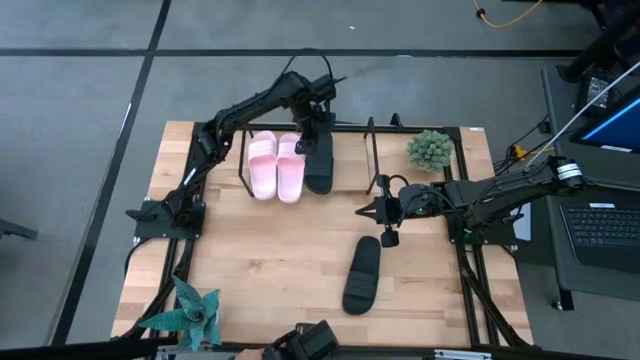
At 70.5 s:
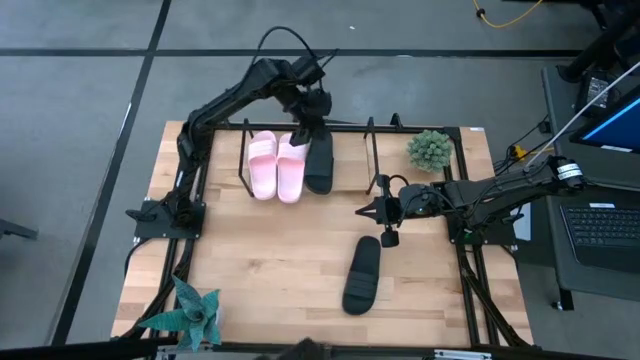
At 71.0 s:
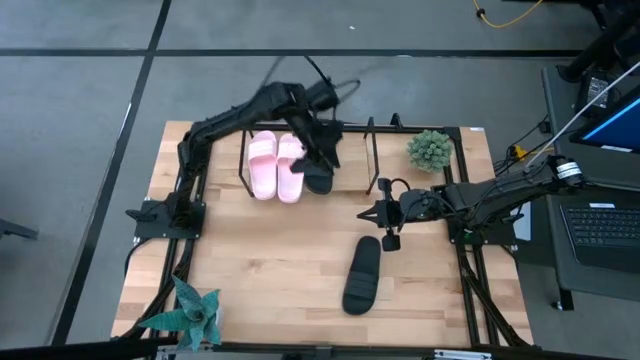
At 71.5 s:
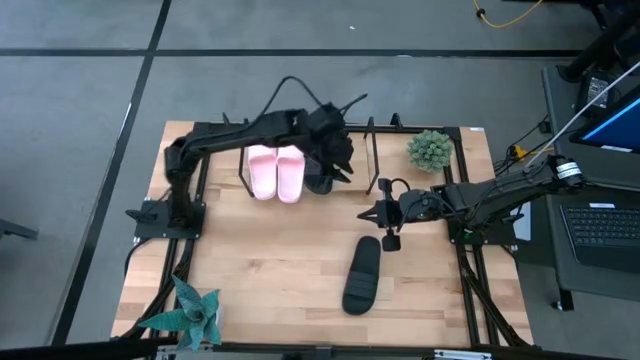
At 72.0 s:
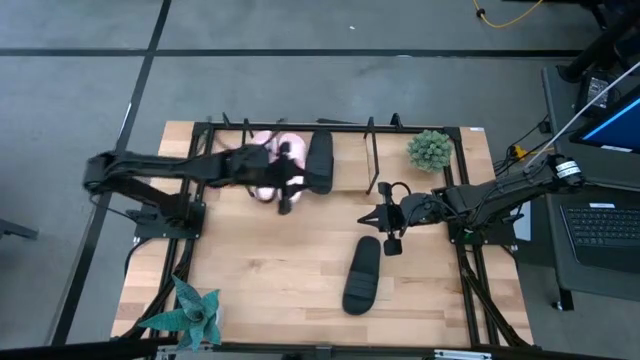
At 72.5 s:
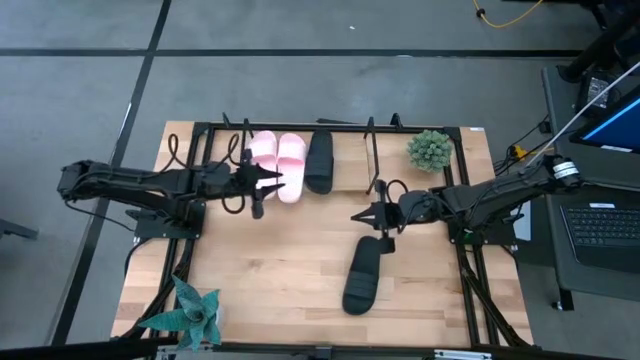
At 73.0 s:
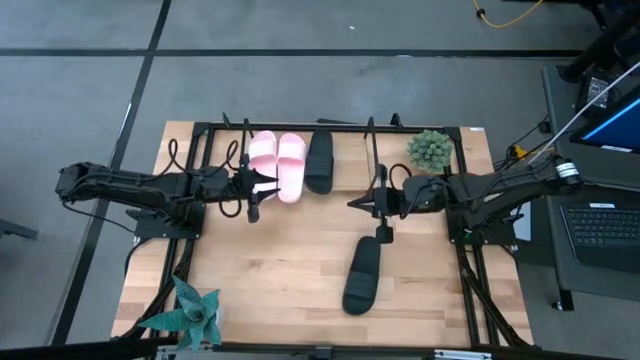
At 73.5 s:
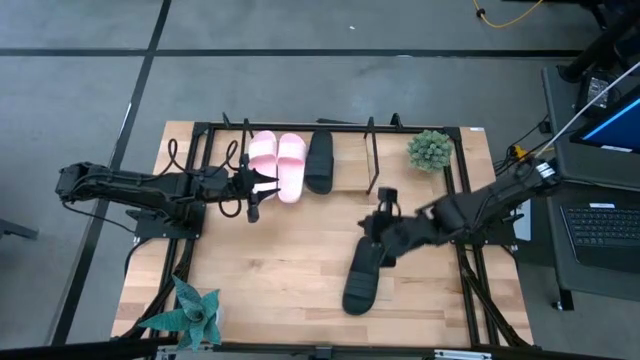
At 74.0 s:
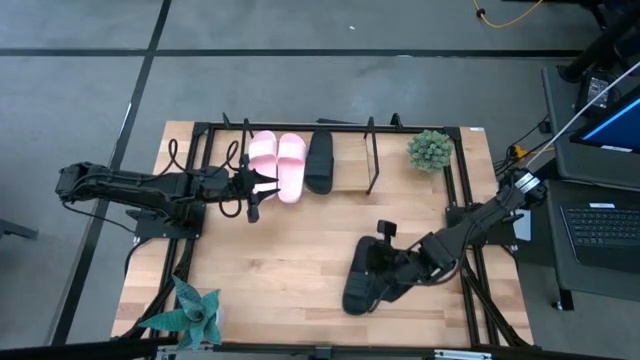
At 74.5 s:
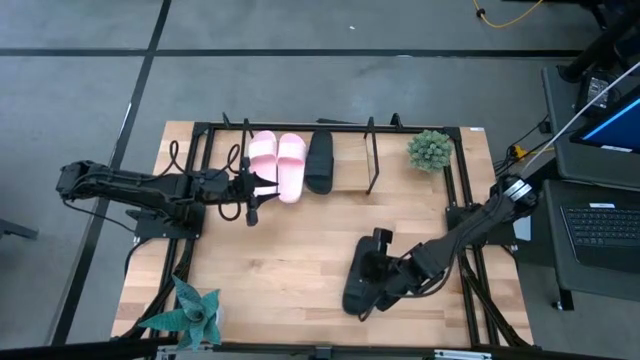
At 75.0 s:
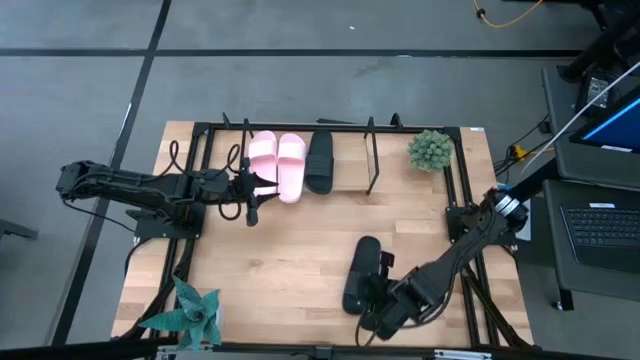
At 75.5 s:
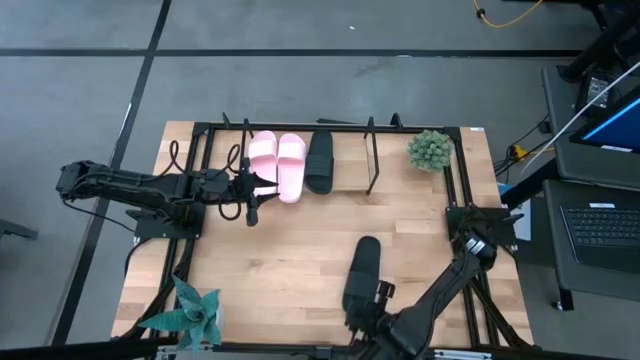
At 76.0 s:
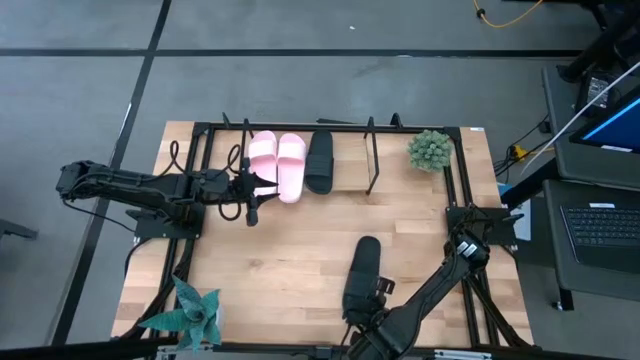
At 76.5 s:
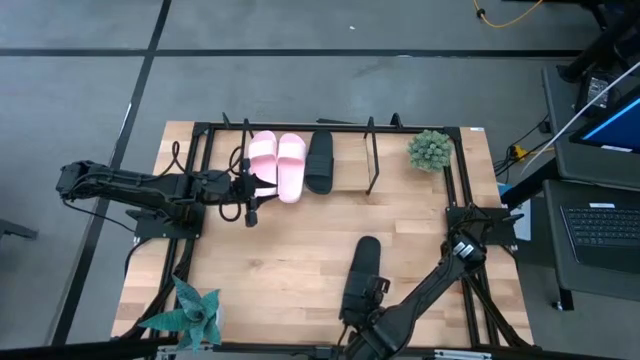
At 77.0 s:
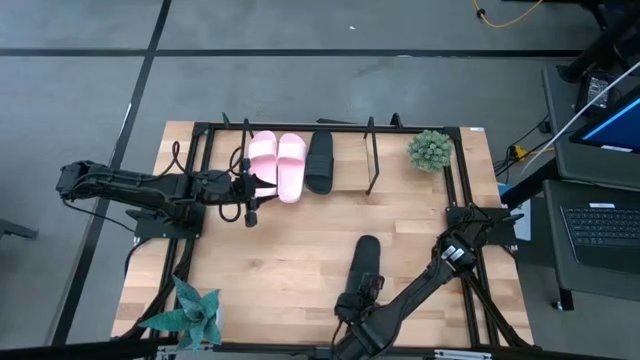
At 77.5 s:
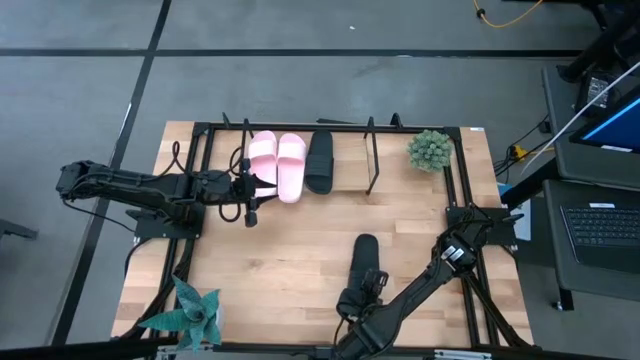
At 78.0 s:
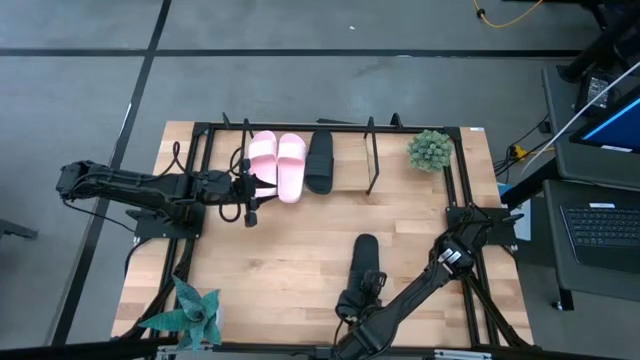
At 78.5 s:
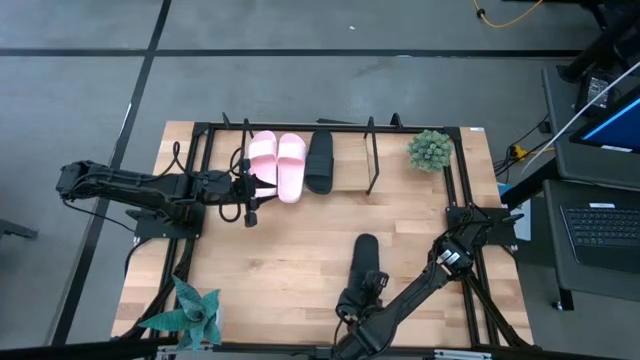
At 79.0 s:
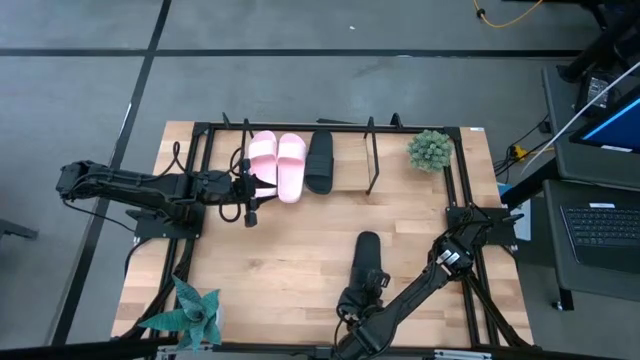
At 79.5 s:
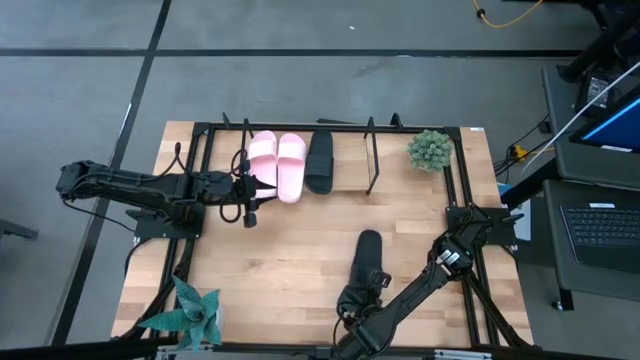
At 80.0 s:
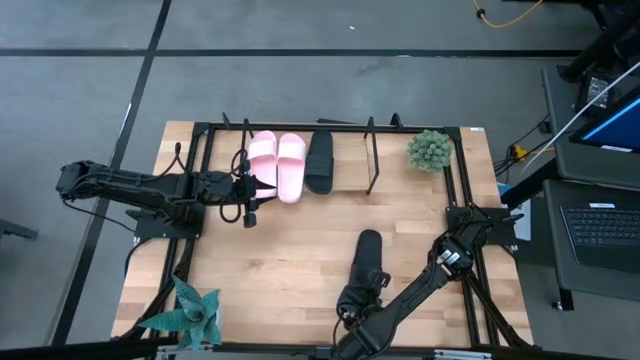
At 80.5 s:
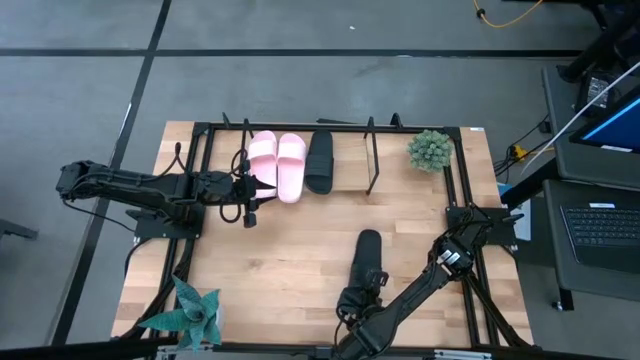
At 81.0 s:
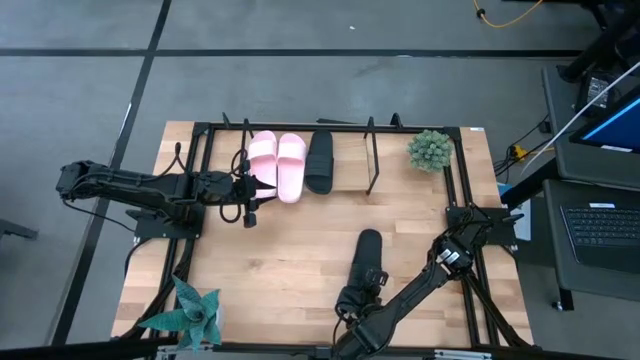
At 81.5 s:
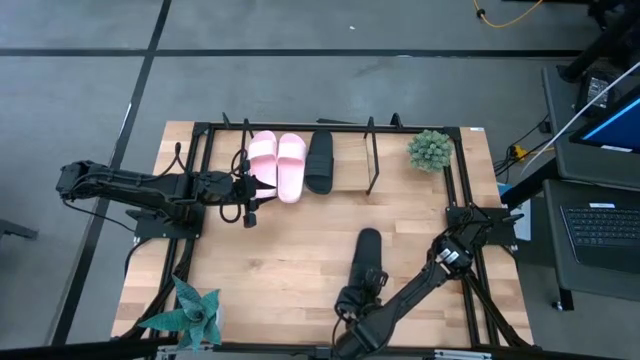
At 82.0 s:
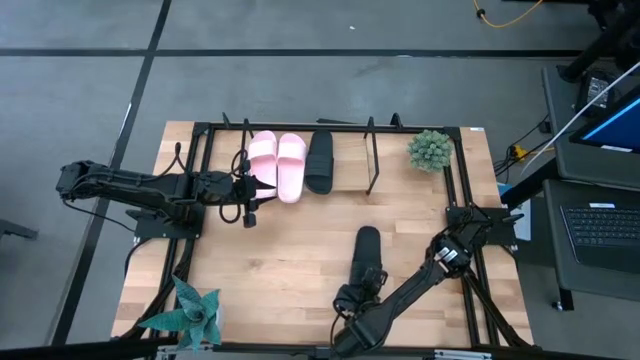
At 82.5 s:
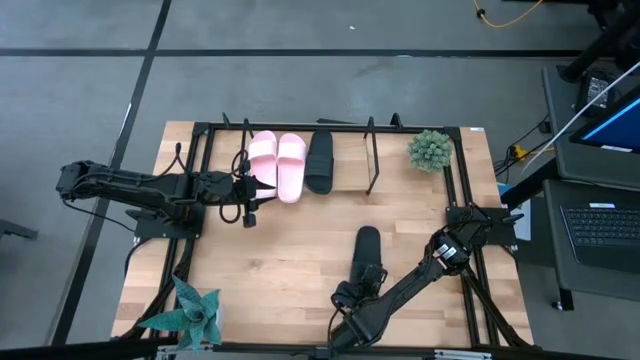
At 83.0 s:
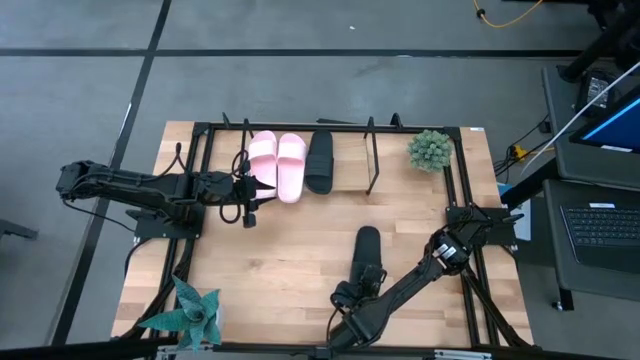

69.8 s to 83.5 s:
Task: Pick and place slides into the shelf
Put the black slide on the shelf

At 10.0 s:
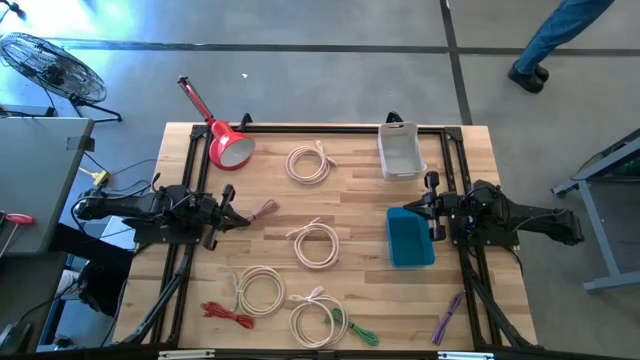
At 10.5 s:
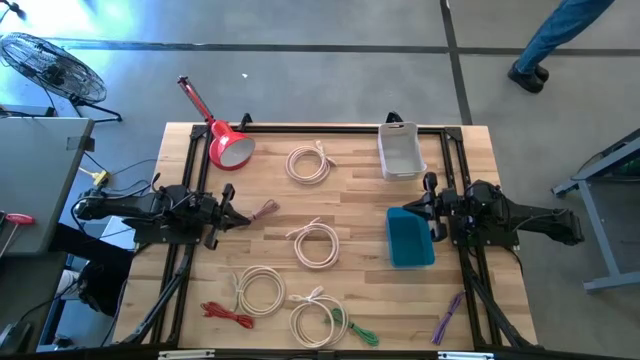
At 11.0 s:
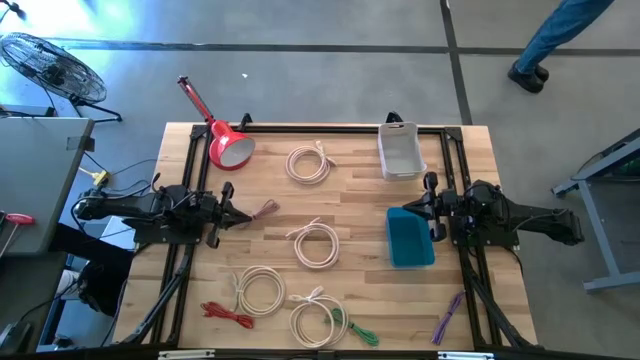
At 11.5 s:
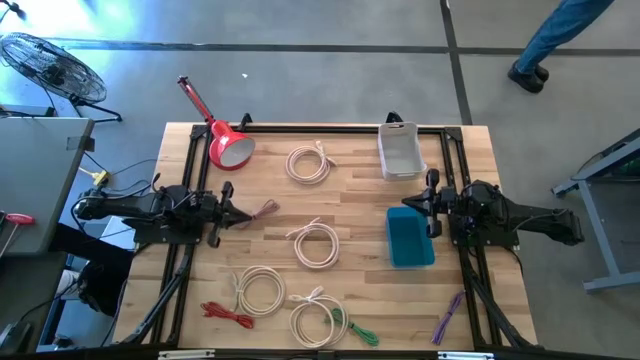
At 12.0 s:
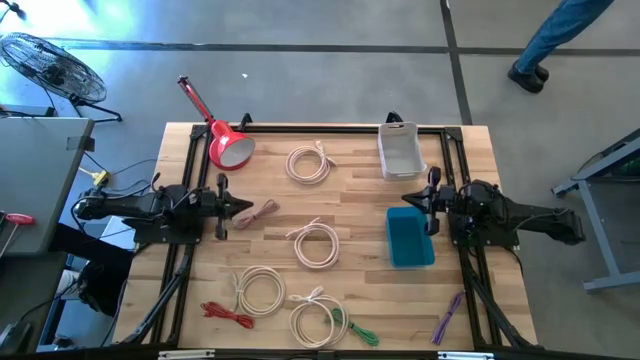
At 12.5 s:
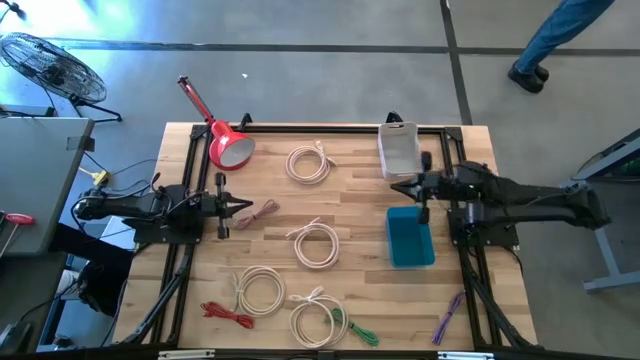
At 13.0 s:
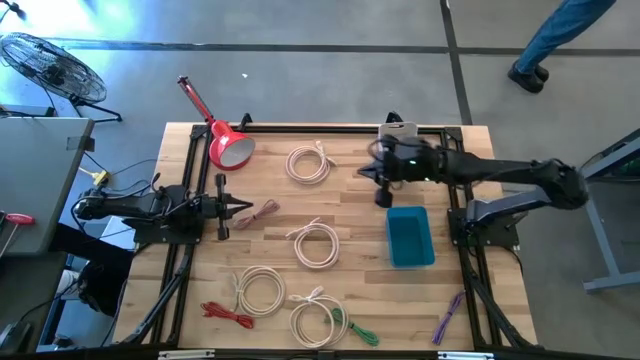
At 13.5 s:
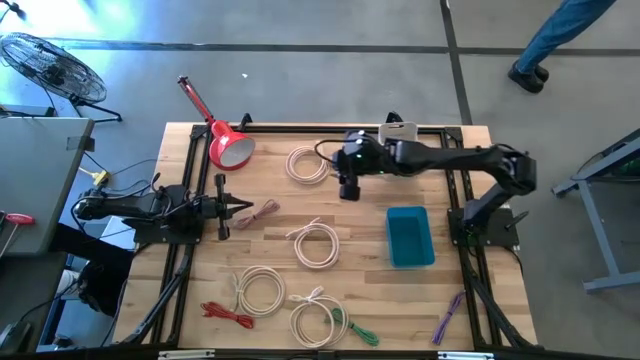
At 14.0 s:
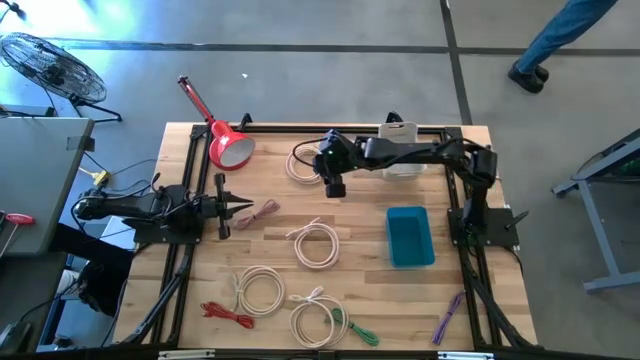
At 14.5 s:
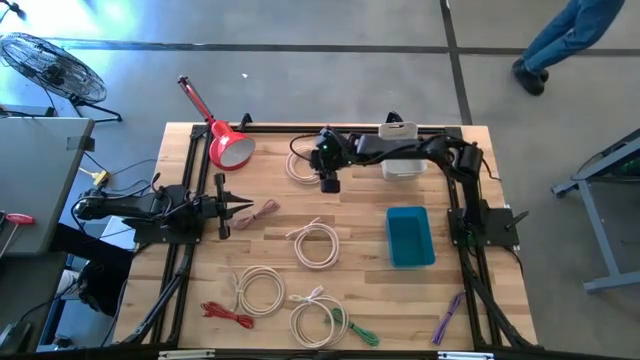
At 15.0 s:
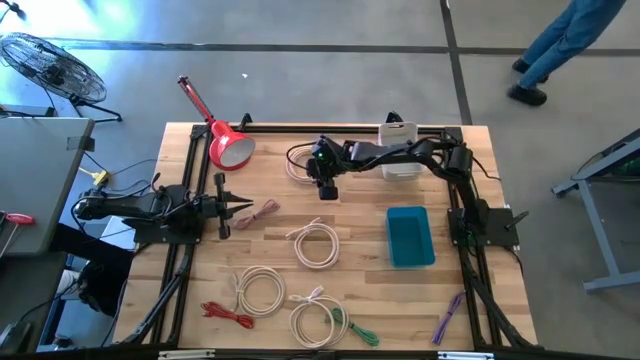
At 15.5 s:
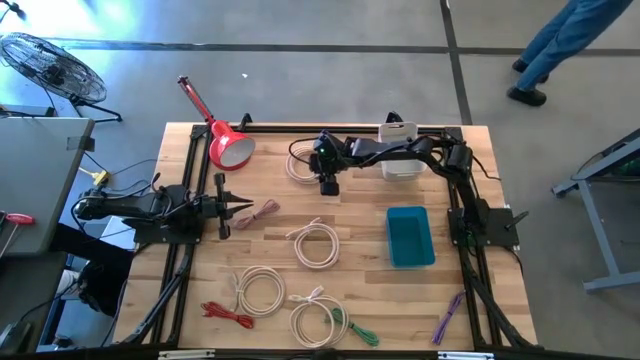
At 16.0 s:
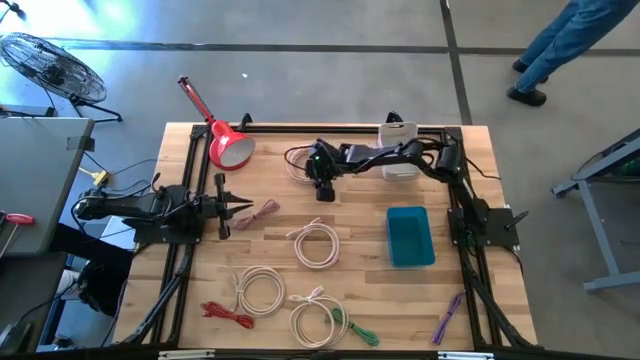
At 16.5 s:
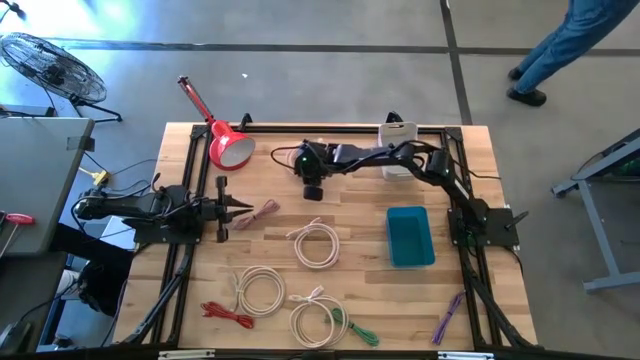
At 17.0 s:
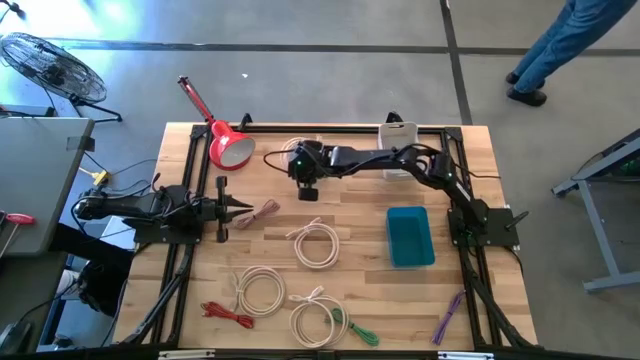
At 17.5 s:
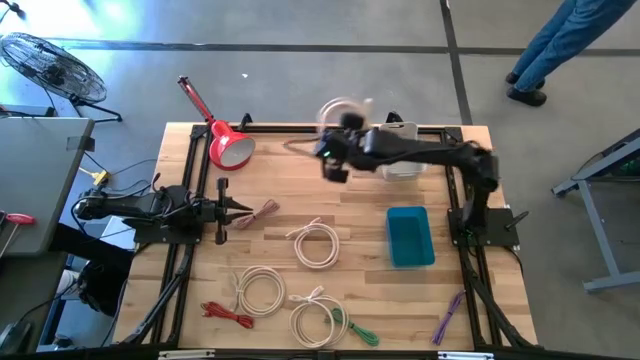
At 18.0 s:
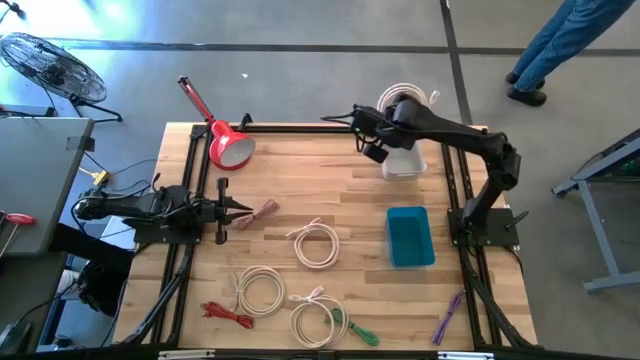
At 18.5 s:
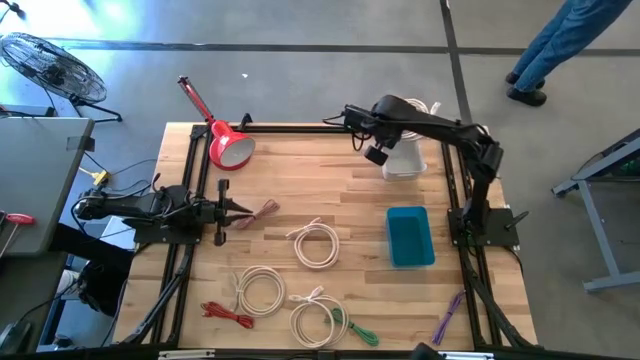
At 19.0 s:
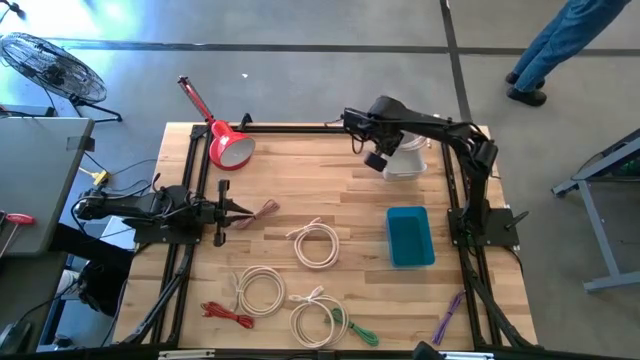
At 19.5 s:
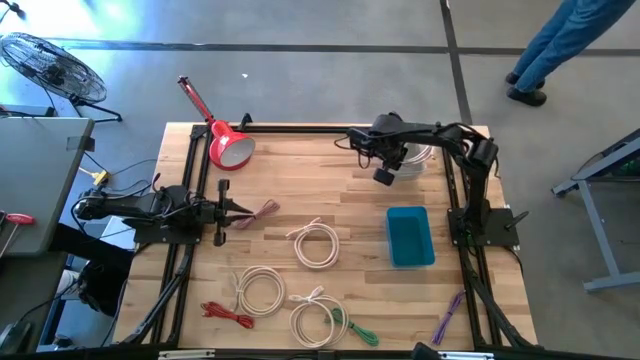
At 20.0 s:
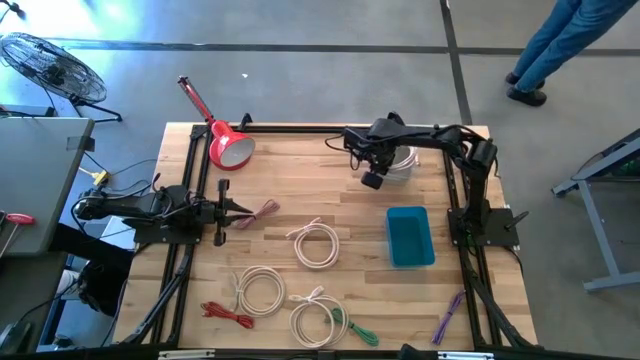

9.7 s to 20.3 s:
Task: Pick & Place USB Port
Put the white HDMI cable into the white bin
